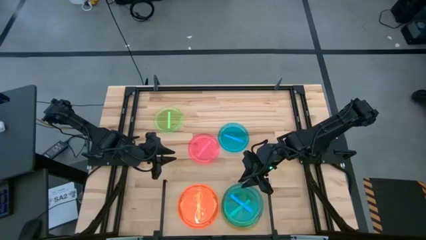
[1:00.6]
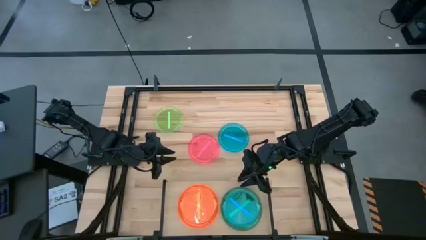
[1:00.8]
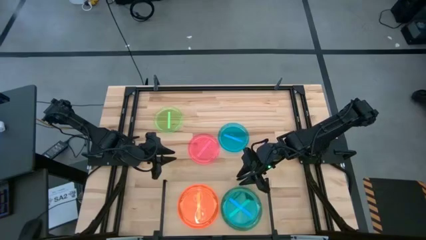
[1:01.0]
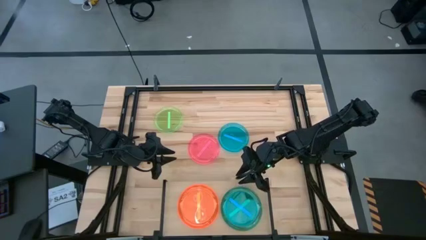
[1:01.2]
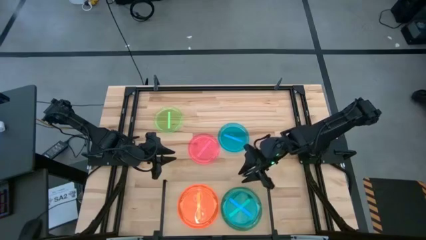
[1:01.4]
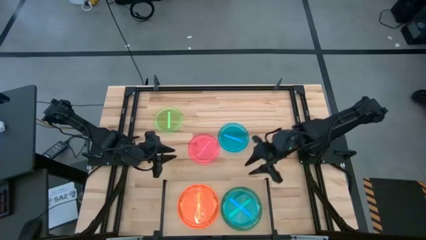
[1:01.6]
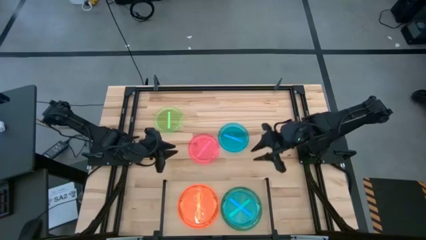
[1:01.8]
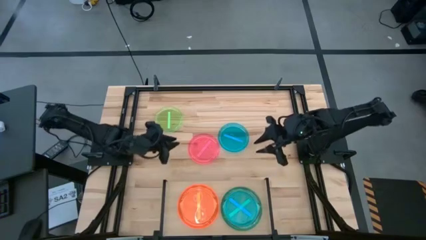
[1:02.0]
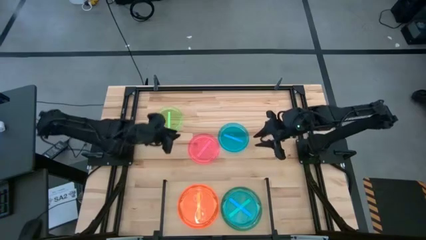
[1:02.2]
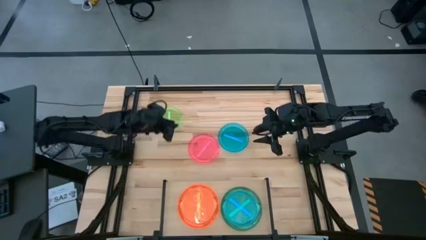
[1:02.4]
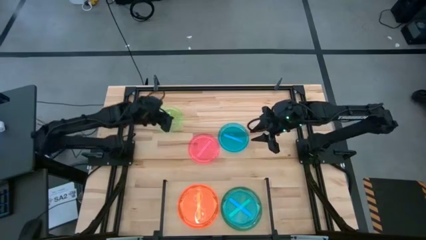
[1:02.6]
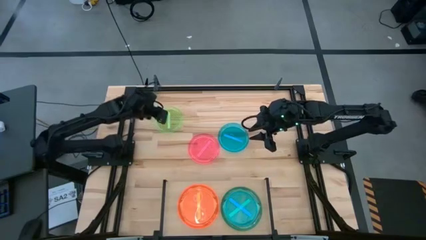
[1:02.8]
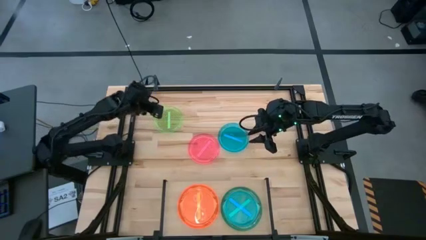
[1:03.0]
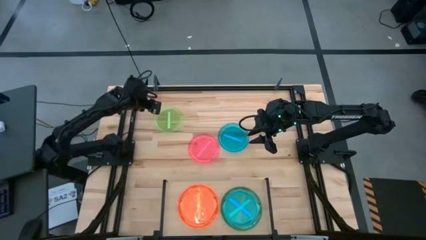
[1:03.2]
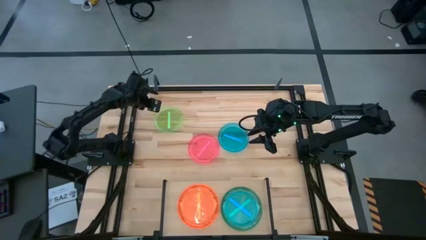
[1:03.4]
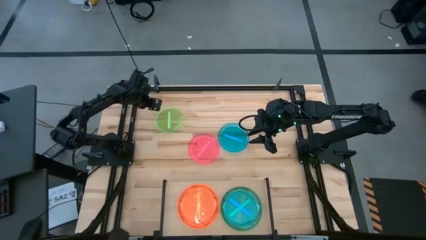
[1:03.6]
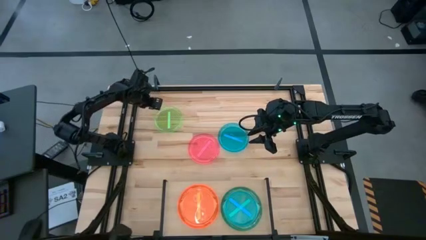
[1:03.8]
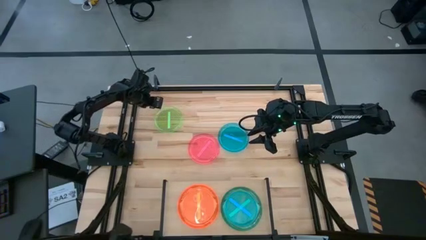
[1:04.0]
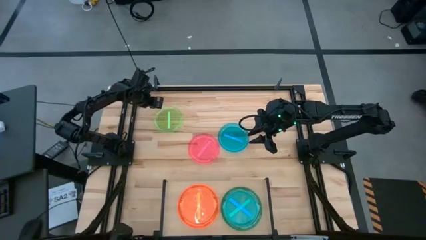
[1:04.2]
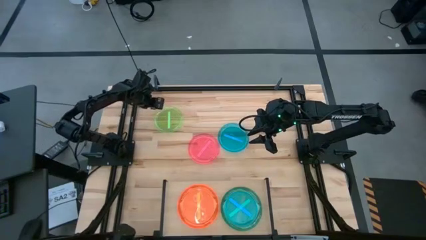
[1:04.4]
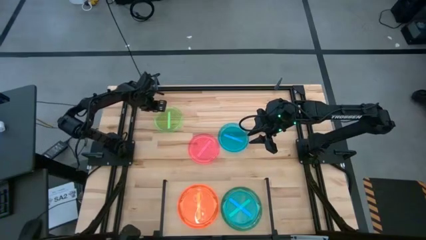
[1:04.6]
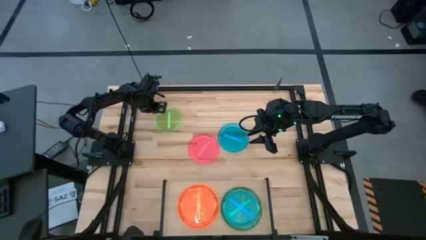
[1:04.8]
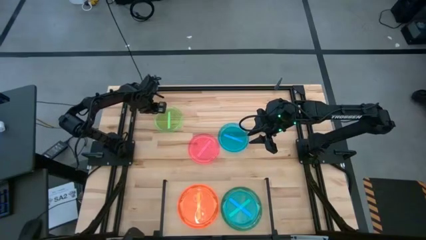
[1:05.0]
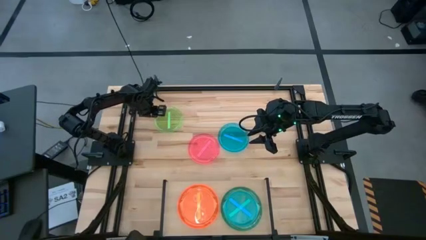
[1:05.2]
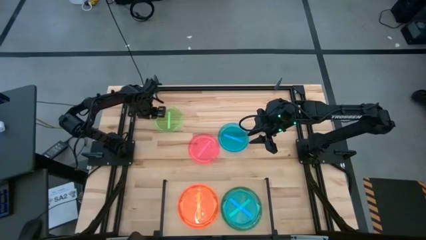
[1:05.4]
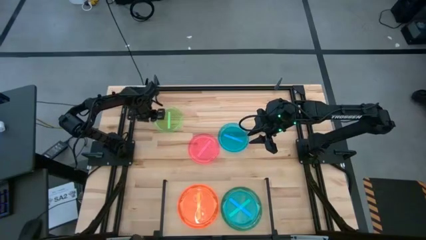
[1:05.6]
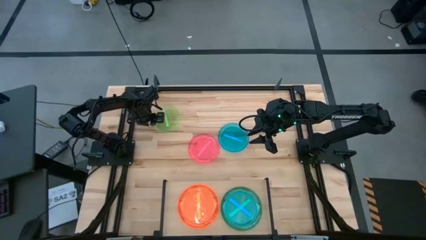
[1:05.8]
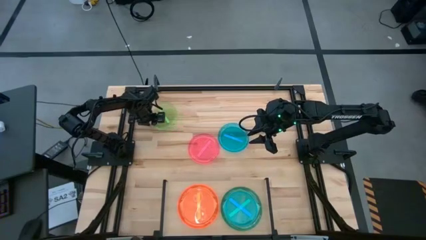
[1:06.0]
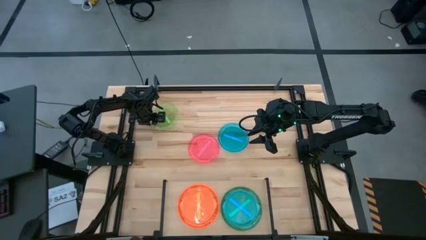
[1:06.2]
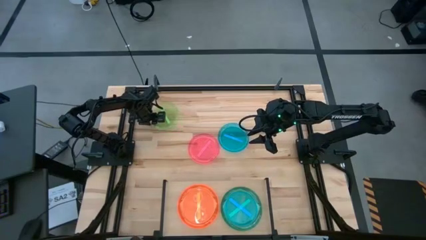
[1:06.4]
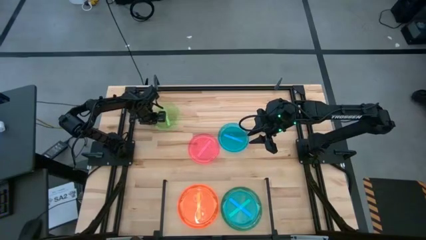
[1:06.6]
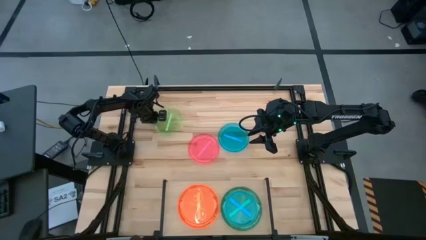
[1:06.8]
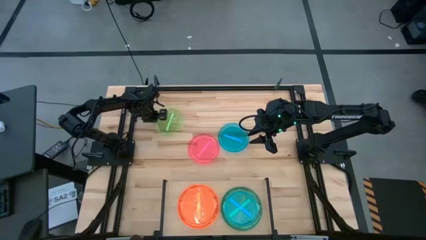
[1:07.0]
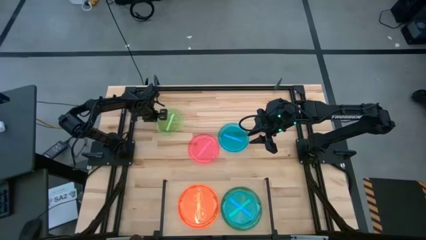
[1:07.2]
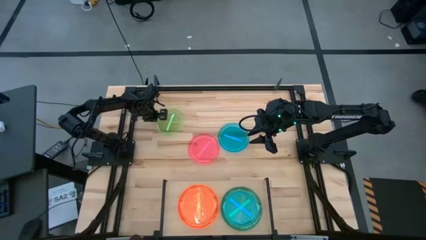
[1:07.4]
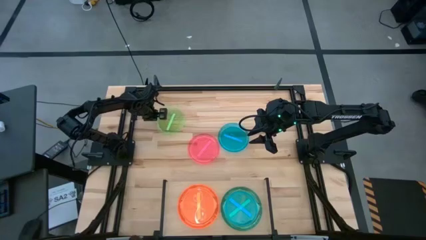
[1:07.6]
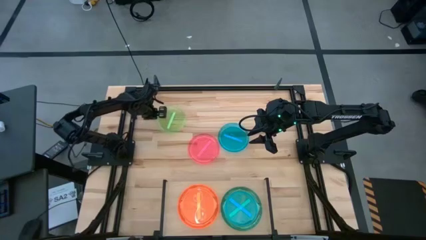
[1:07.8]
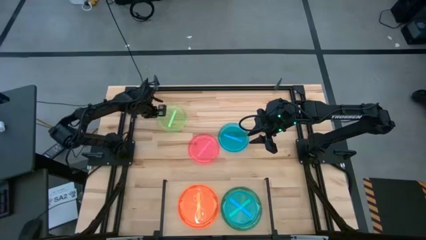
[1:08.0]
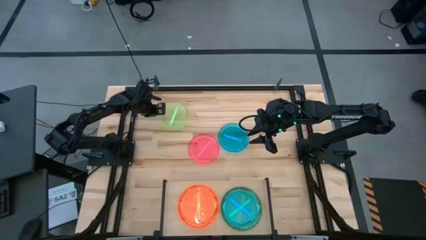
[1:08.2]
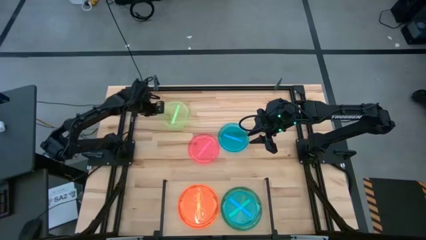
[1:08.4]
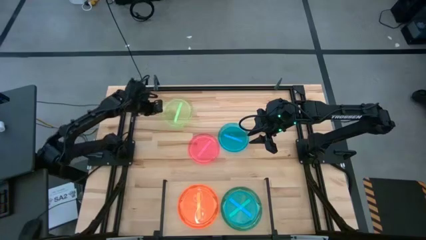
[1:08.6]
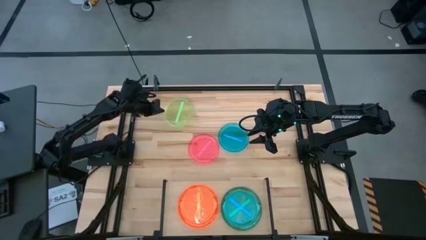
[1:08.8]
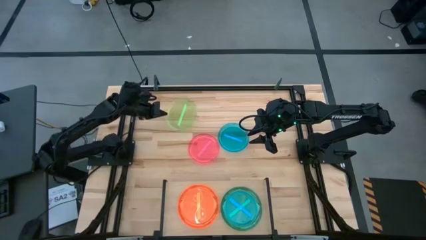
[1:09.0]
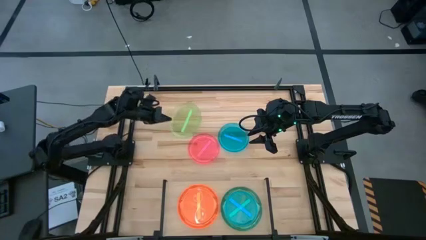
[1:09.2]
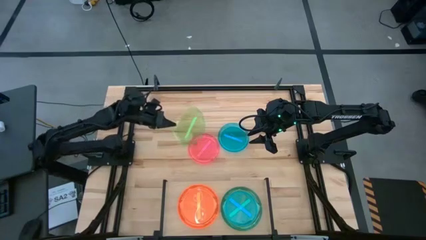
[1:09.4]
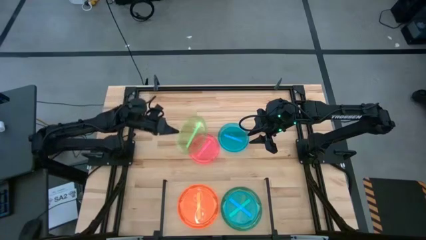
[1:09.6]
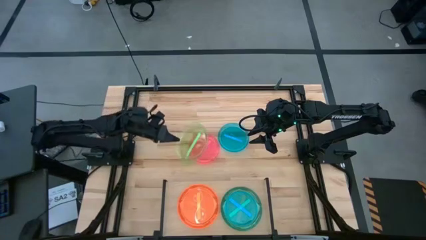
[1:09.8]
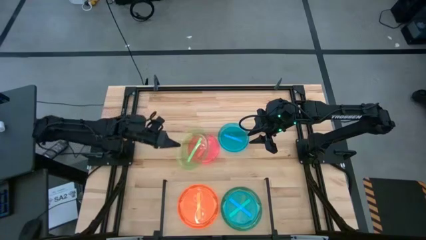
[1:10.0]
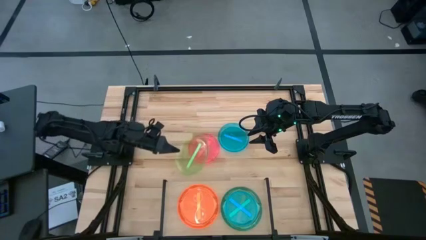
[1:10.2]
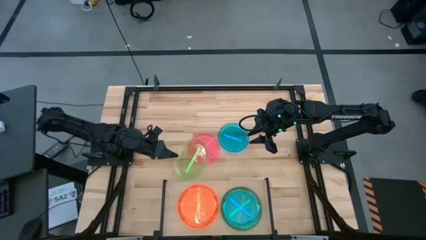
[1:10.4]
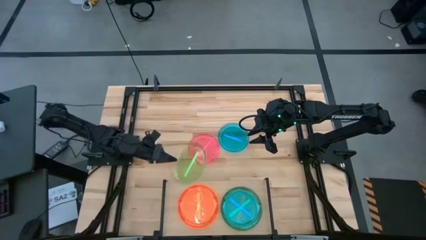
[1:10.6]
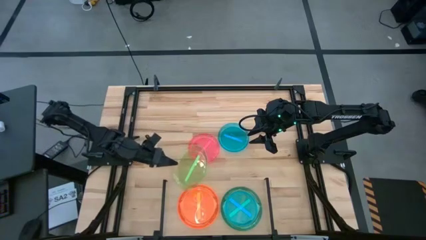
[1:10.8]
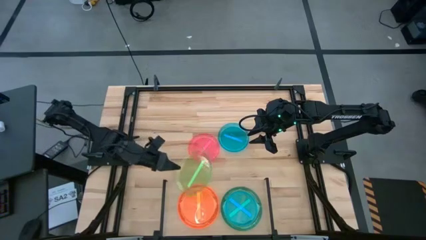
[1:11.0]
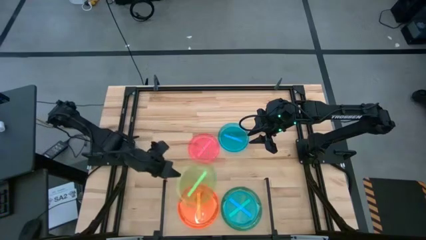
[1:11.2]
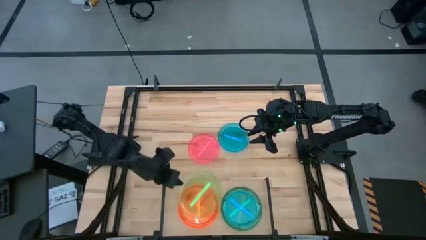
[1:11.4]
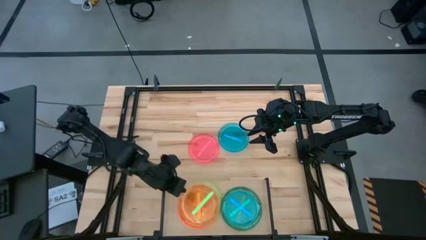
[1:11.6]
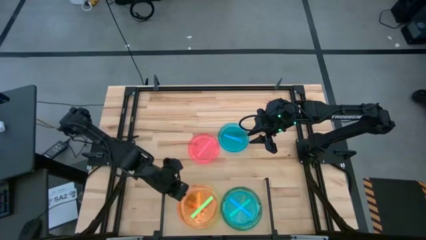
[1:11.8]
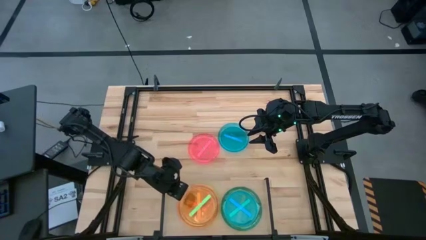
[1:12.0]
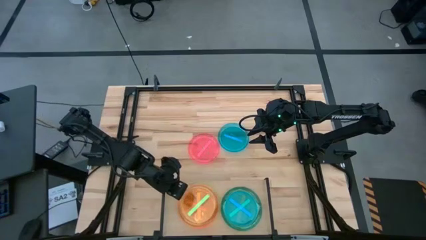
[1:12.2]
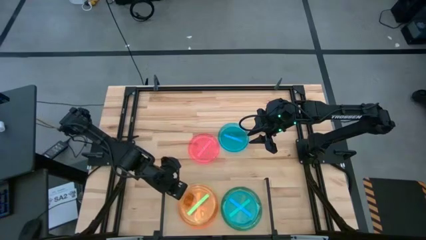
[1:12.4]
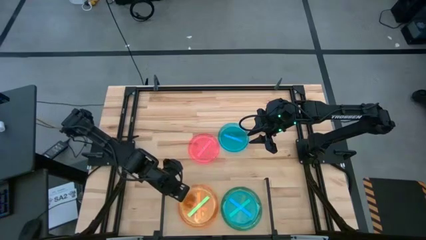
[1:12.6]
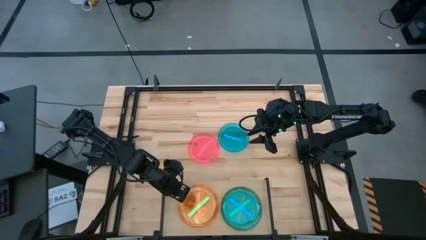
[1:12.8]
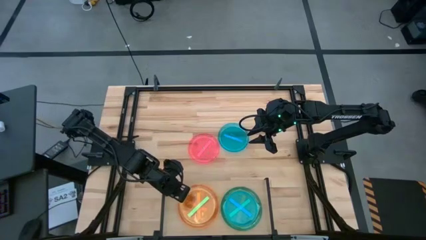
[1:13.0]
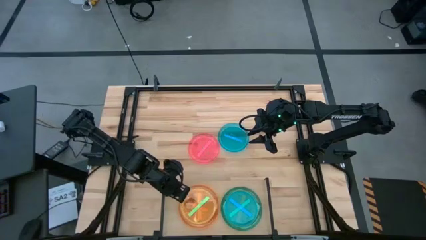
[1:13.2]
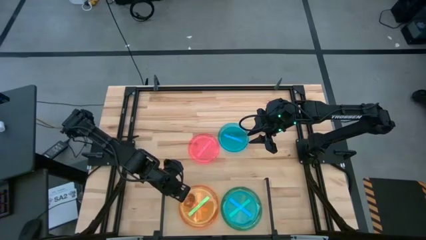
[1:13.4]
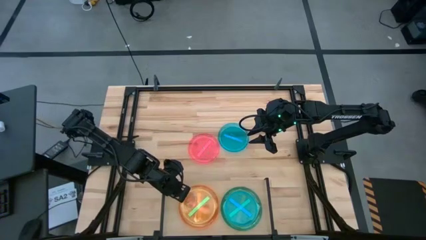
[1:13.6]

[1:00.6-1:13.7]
Task: Place and stack plates onto a shelf
Stack the green plate on top of the orange plate on the shelf

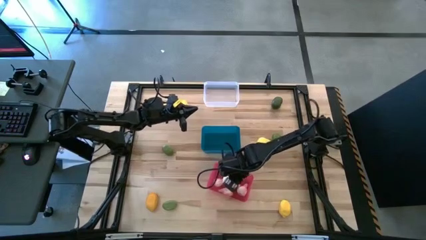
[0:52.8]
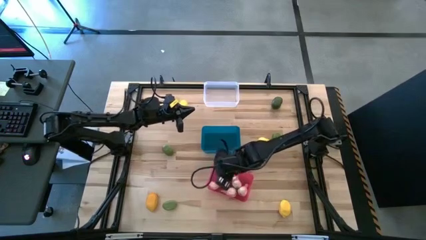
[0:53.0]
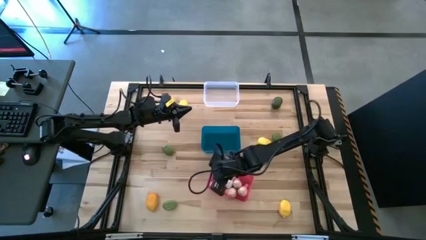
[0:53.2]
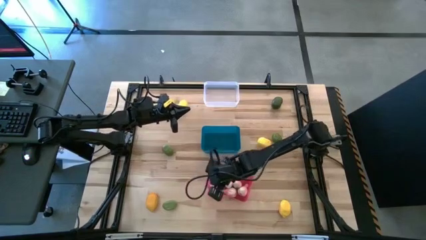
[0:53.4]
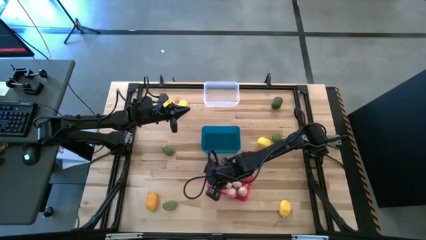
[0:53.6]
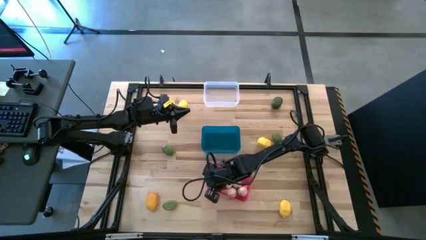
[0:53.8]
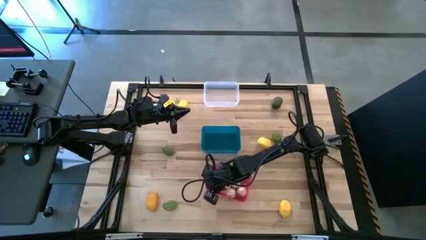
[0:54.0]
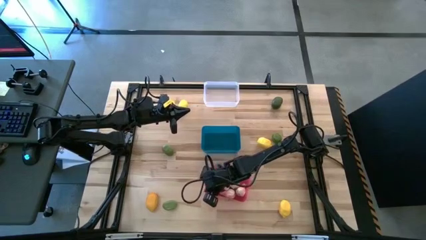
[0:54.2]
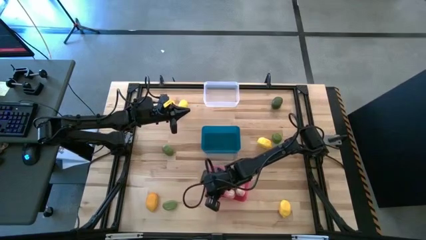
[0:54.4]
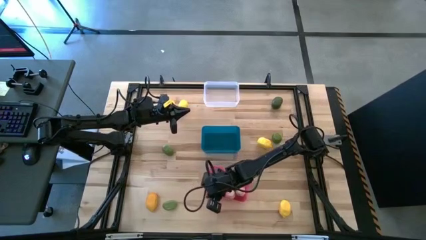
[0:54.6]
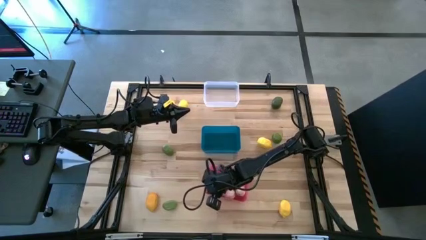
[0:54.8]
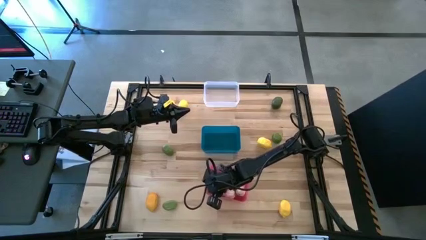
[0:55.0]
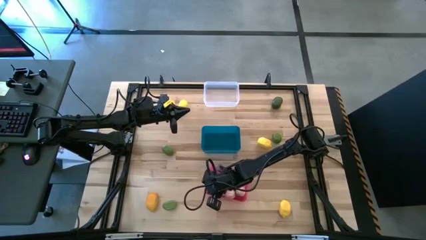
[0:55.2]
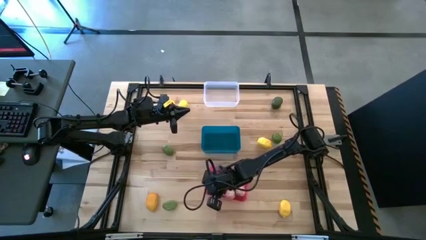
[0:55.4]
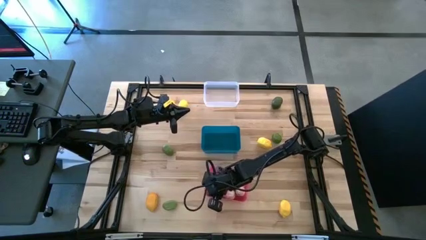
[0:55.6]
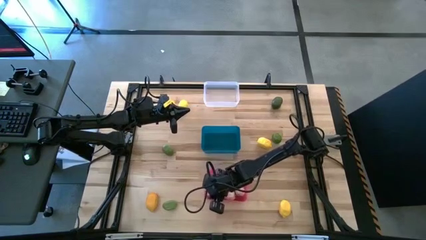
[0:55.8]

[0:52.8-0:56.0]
Task: Sort produce into baskets
Adjust the pink bin
